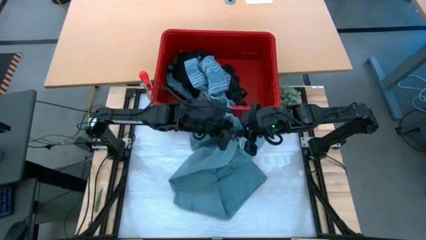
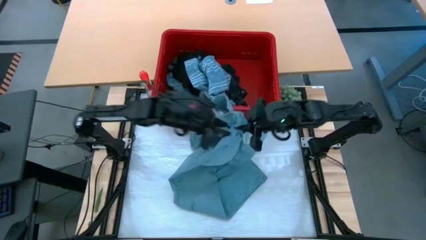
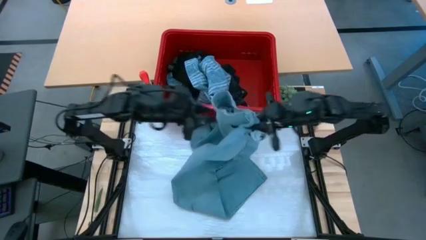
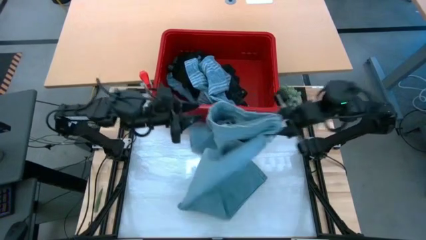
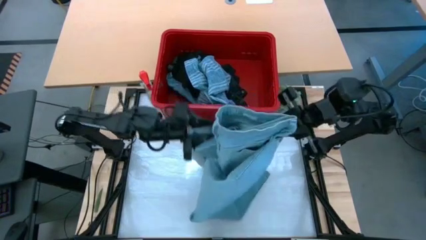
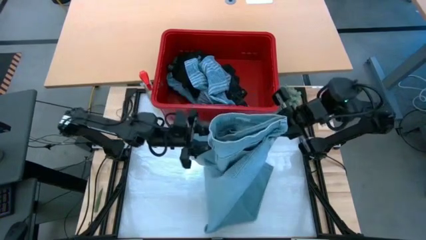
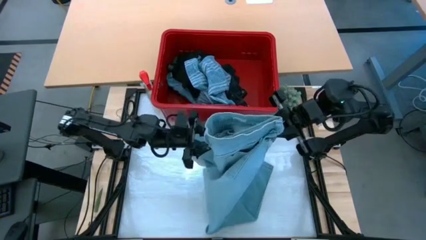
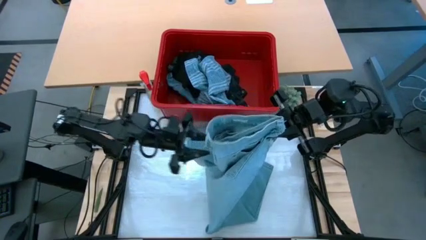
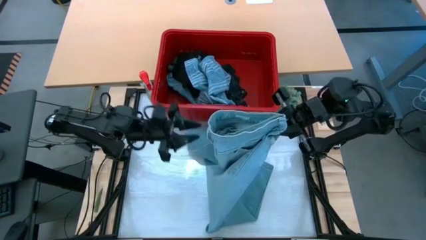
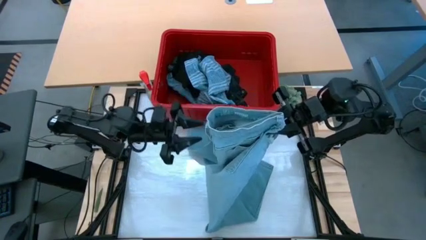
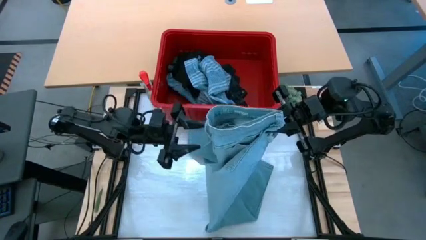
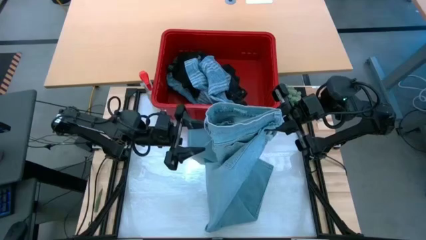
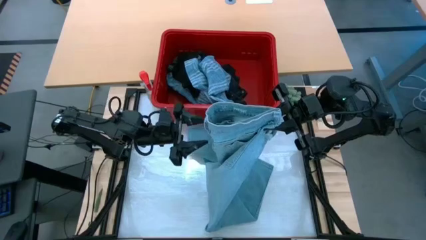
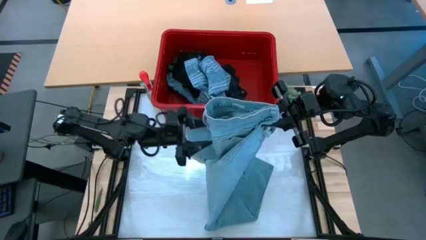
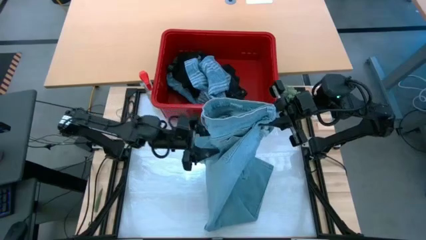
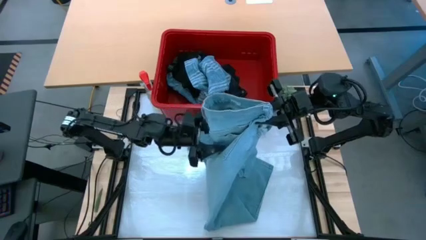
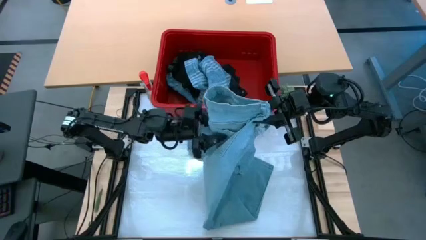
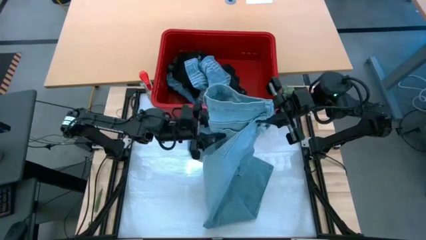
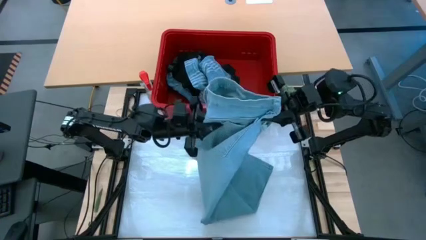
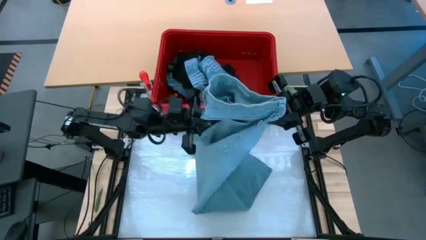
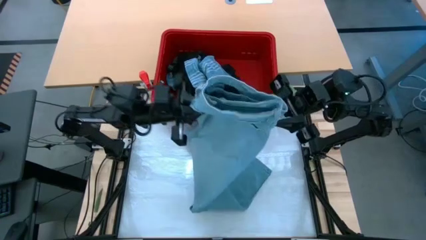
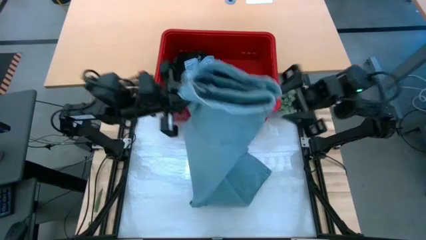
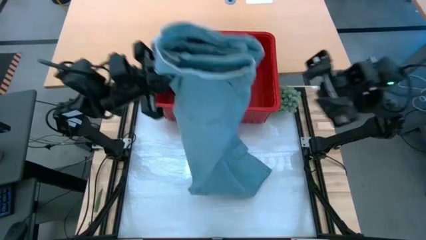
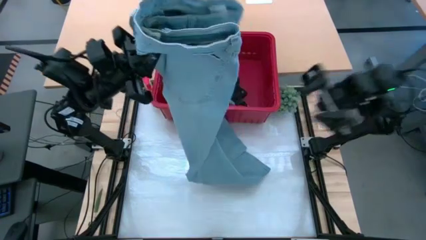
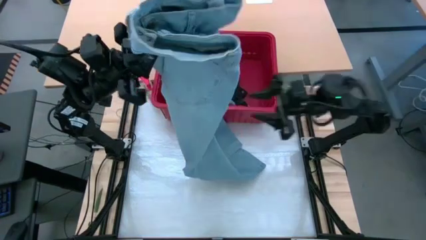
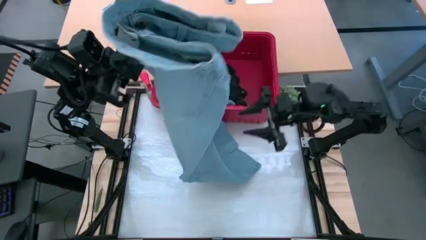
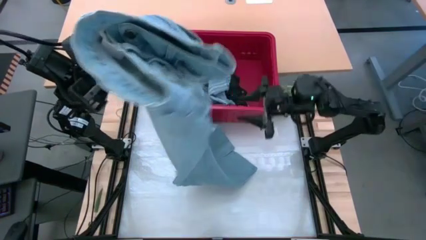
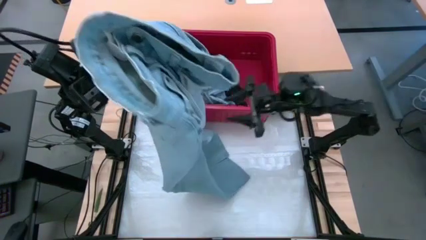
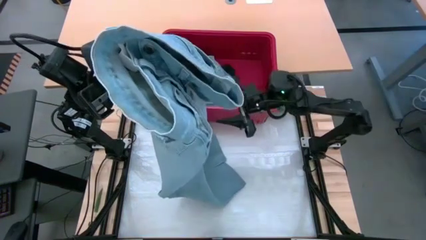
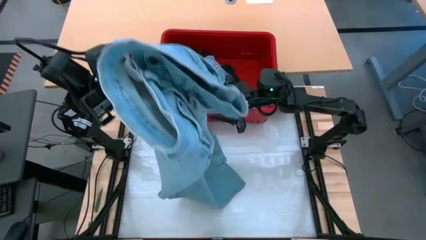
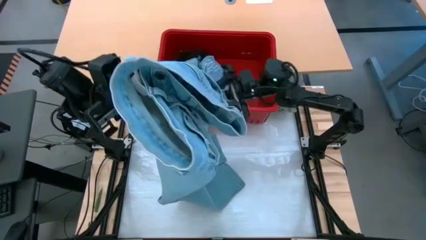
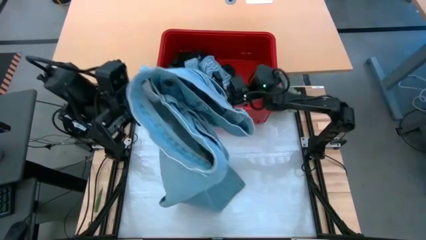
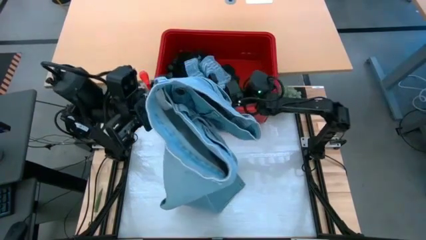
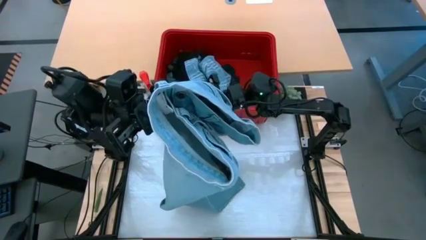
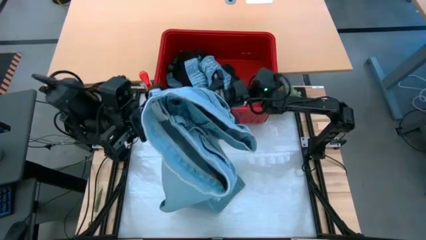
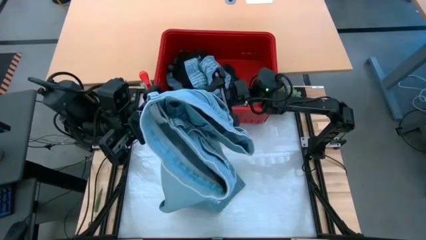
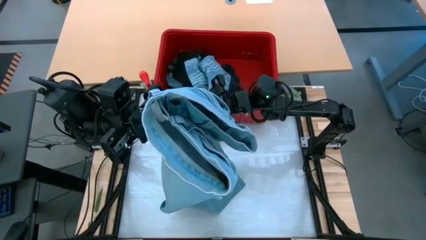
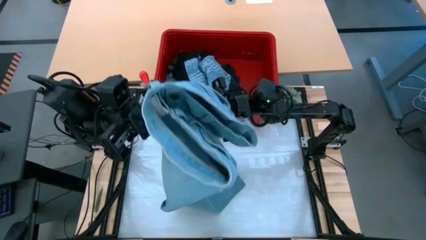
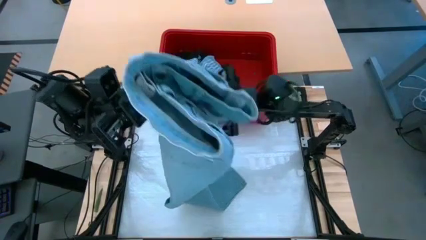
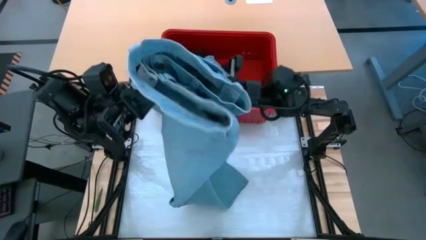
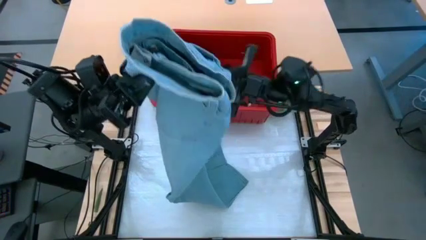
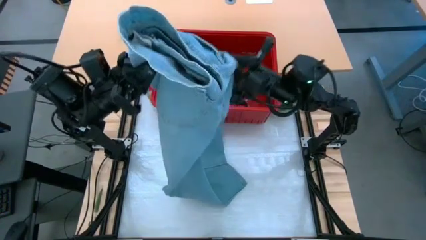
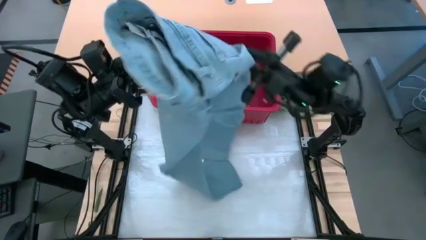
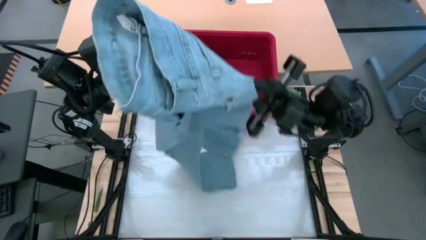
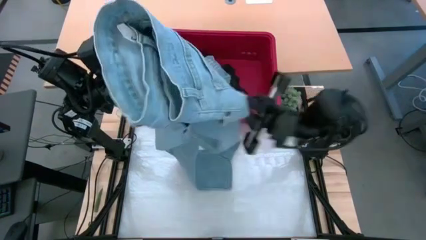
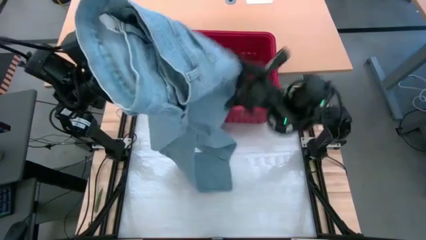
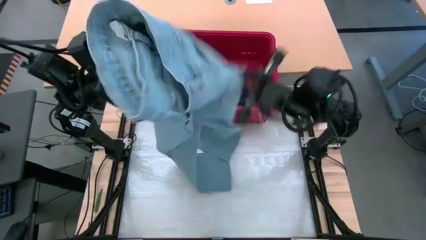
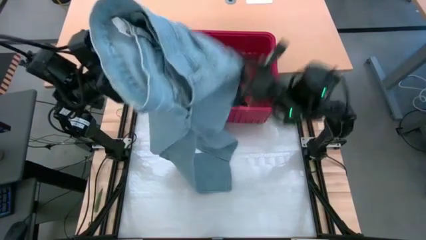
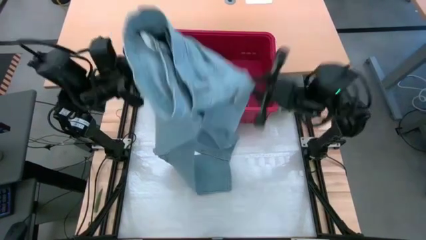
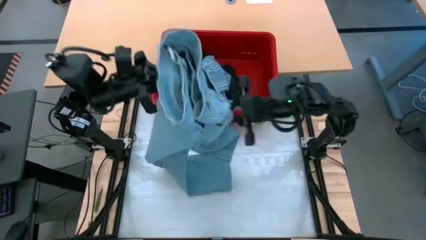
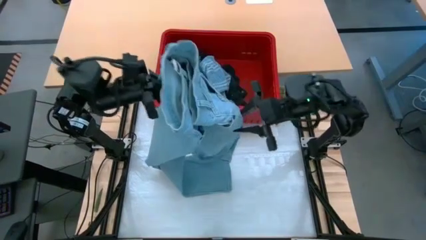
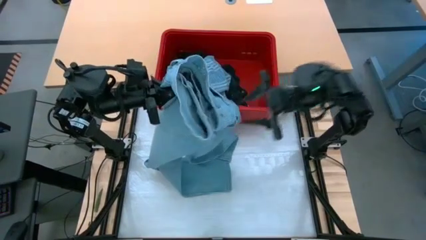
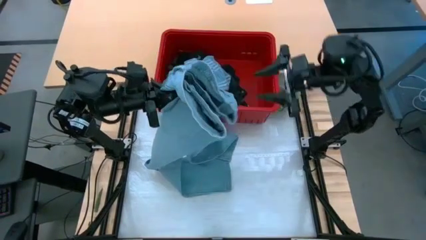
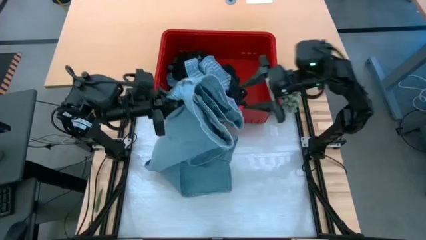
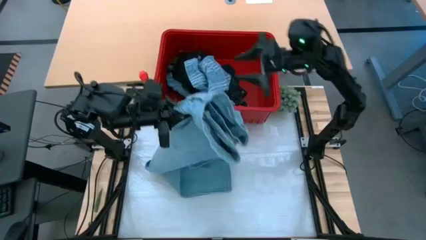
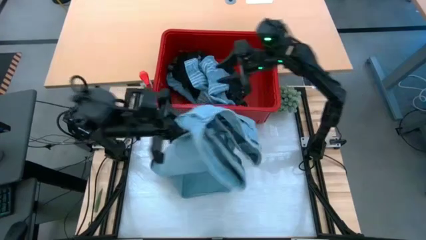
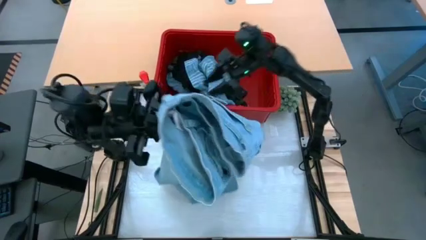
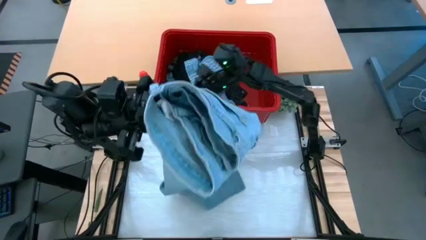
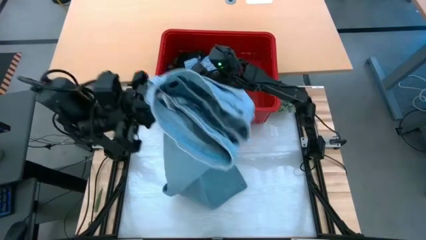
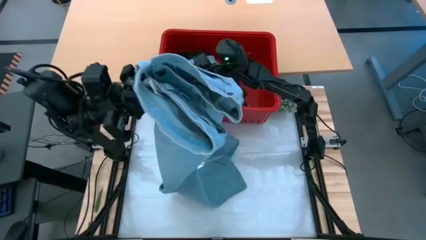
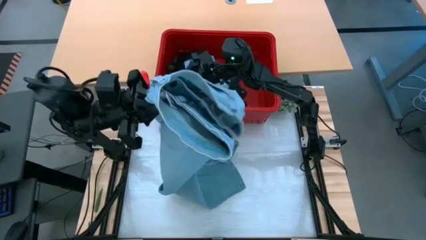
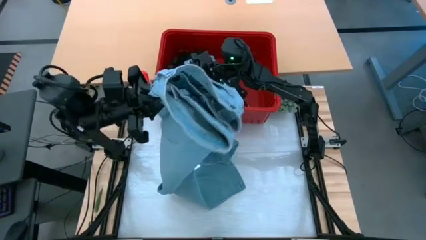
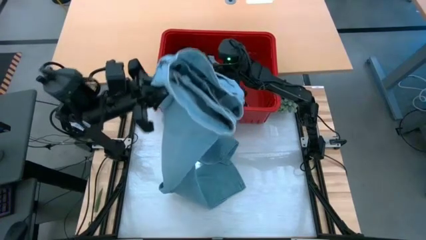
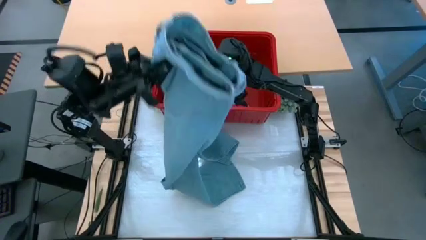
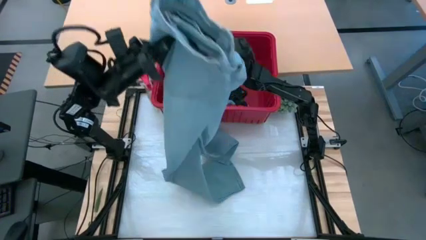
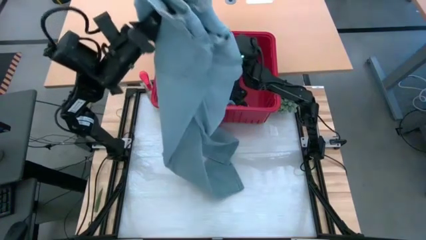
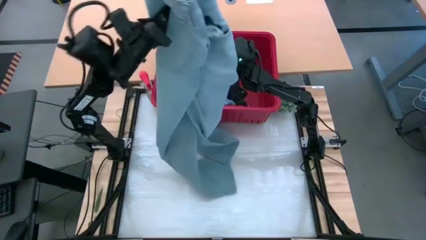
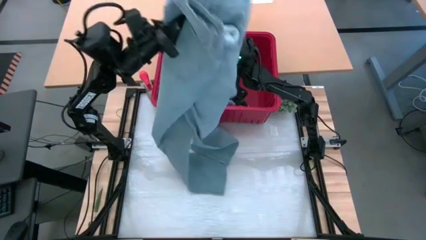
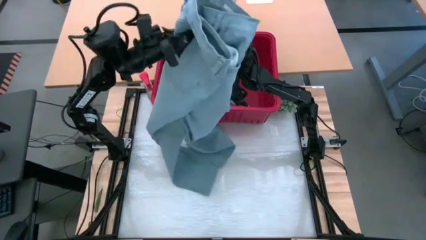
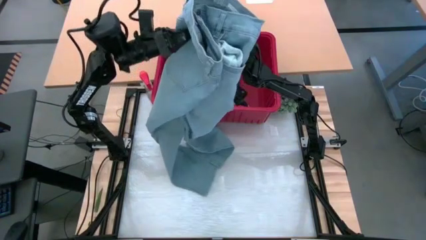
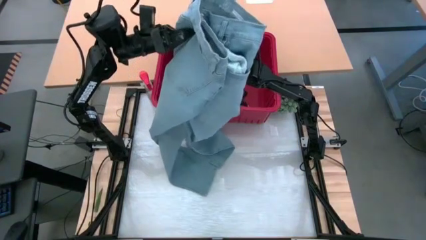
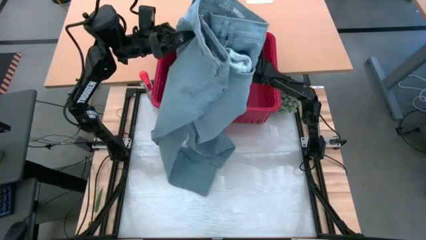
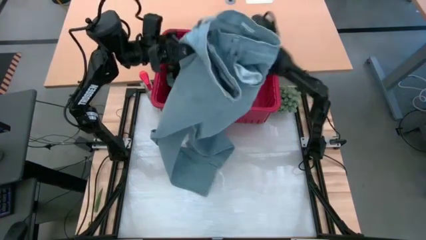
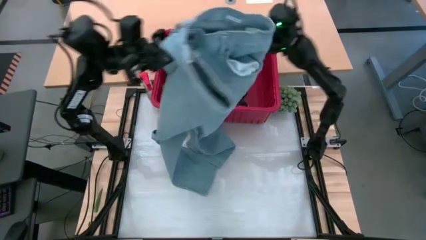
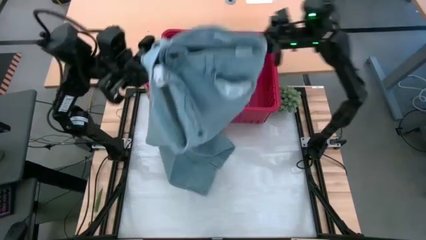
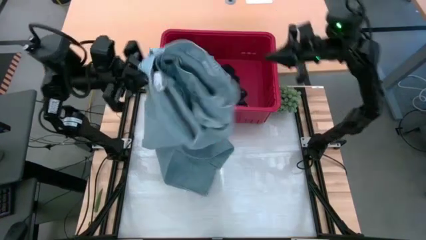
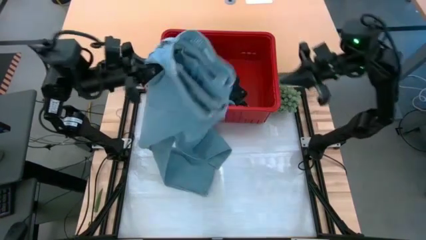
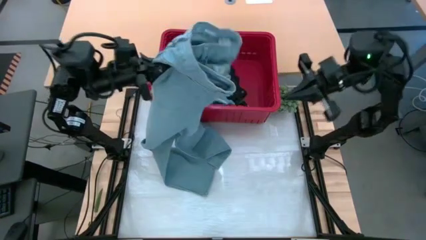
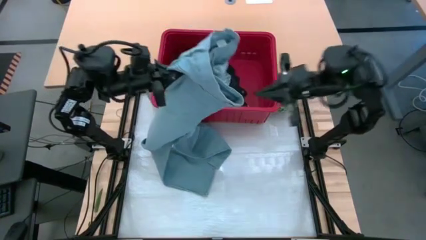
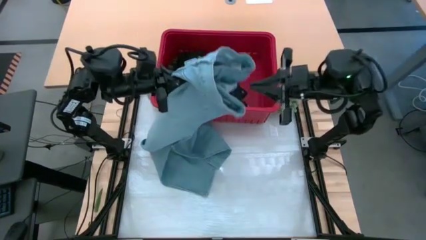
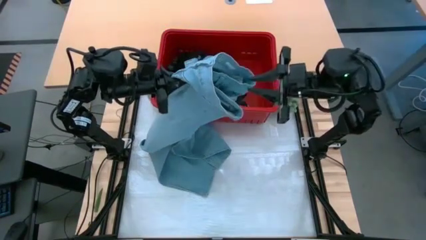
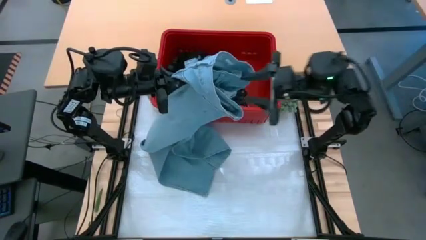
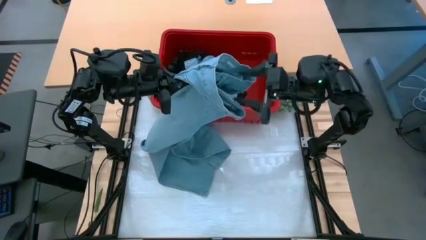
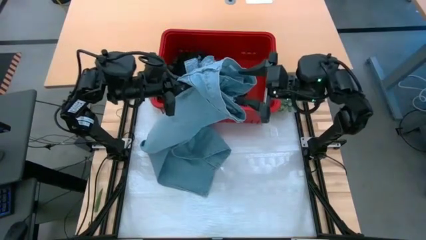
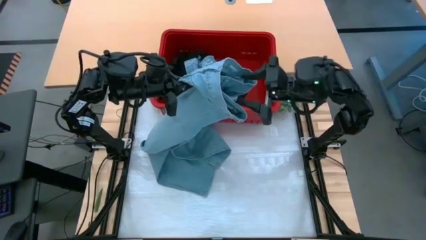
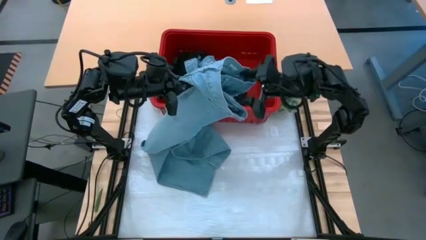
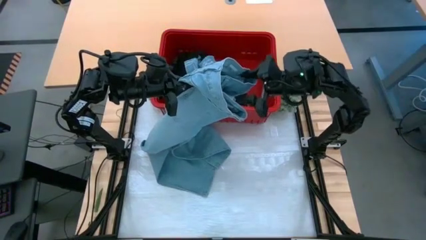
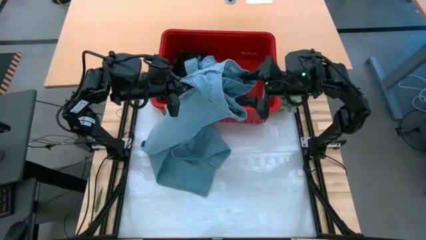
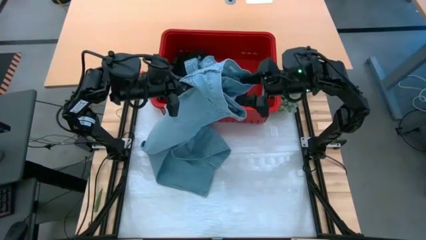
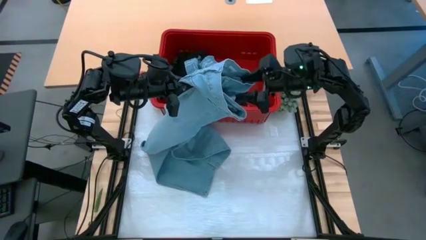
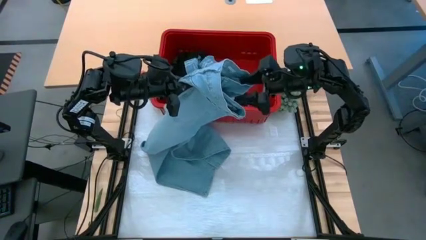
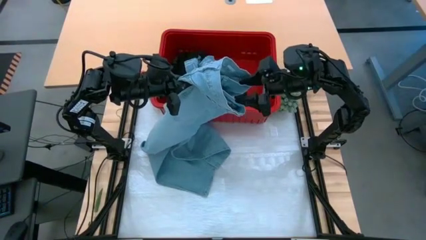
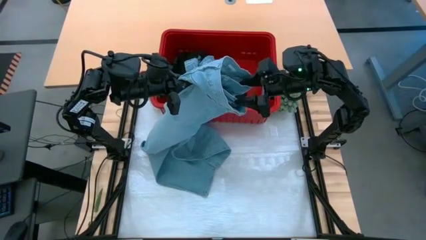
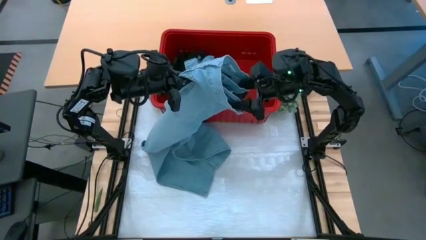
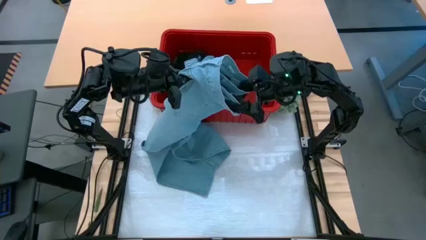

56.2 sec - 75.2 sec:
Task: Fold Laundry from Bin
Fold the light blue pants
